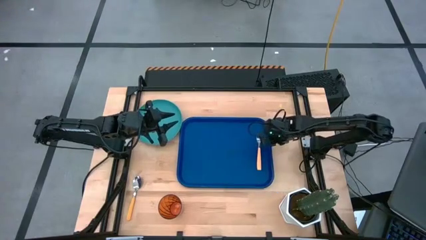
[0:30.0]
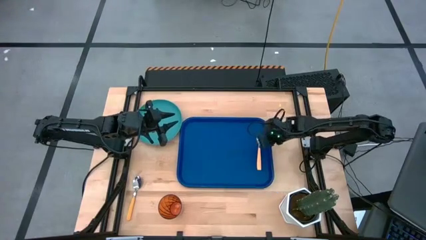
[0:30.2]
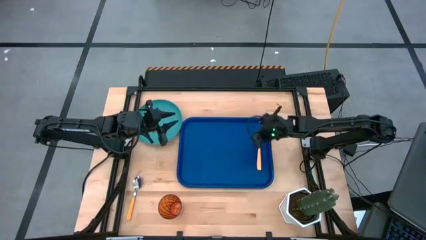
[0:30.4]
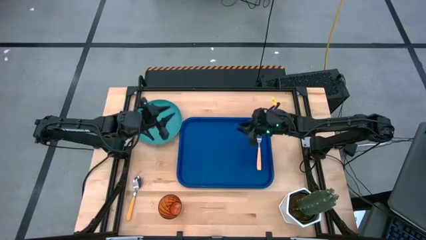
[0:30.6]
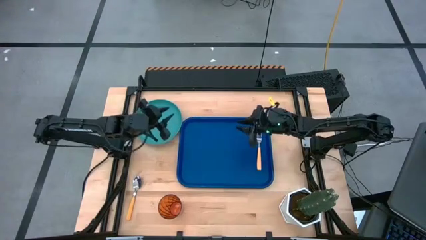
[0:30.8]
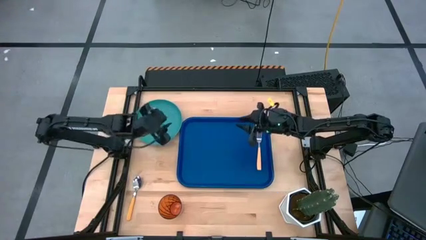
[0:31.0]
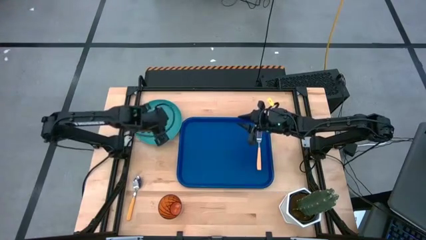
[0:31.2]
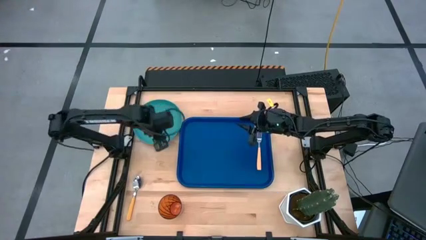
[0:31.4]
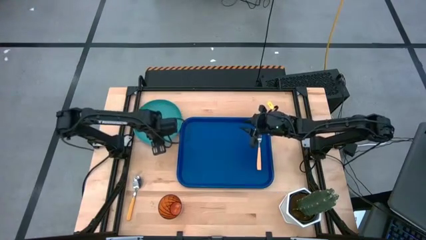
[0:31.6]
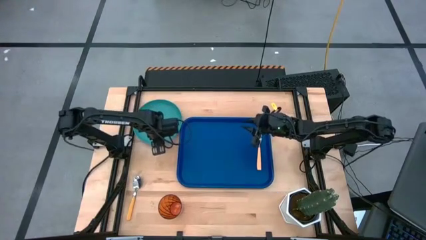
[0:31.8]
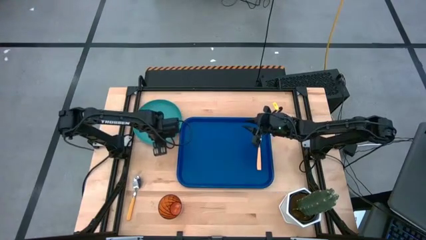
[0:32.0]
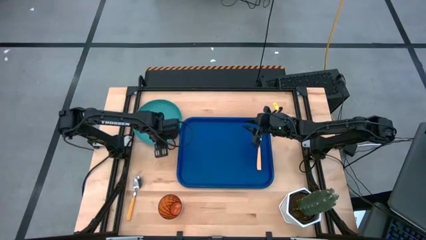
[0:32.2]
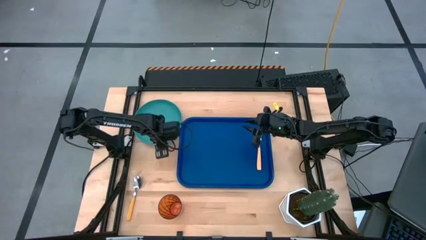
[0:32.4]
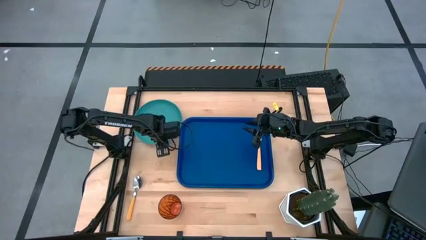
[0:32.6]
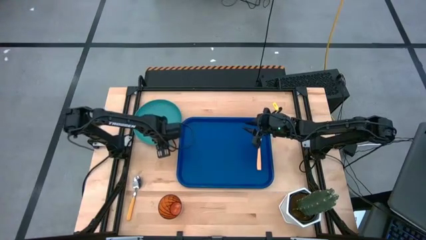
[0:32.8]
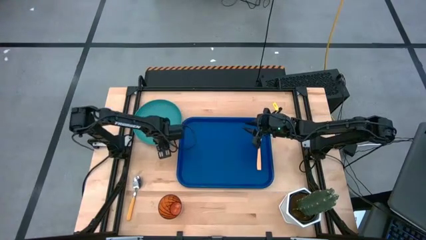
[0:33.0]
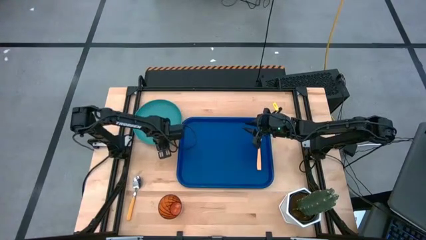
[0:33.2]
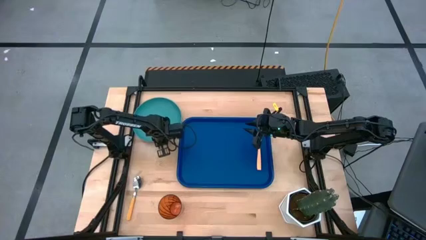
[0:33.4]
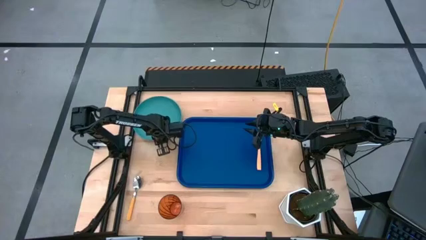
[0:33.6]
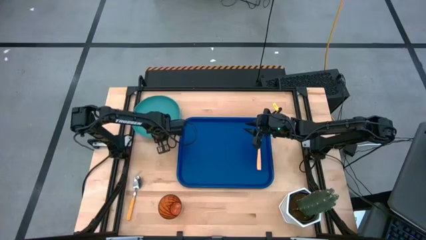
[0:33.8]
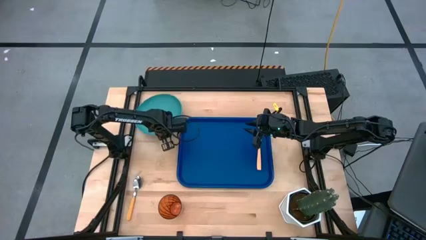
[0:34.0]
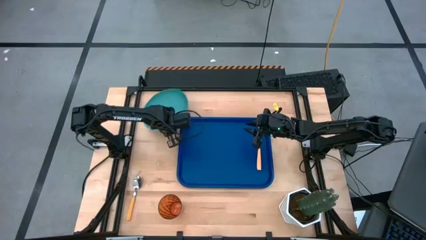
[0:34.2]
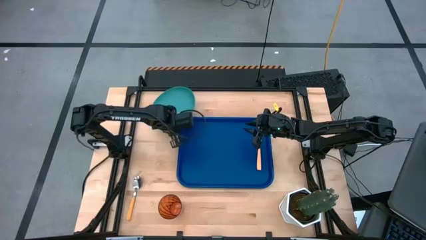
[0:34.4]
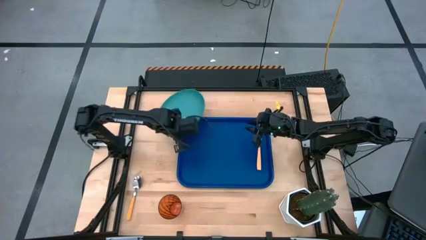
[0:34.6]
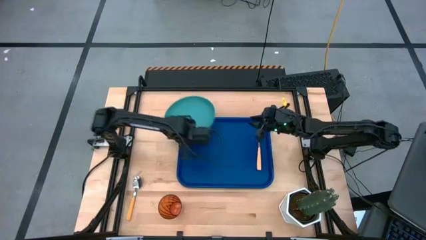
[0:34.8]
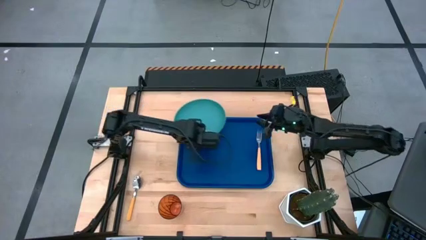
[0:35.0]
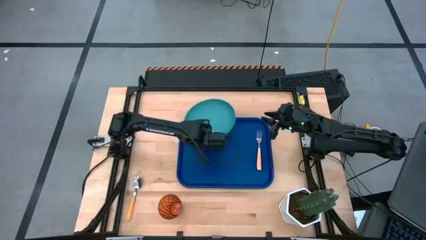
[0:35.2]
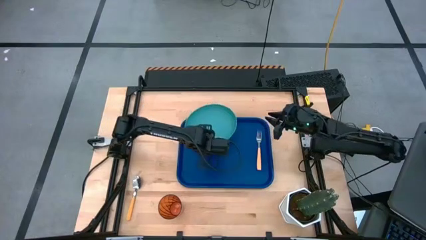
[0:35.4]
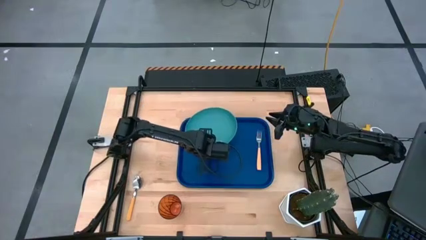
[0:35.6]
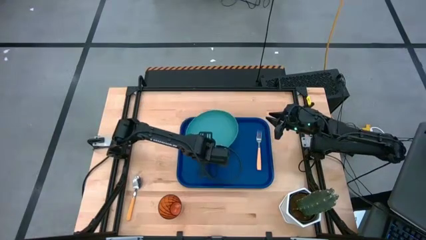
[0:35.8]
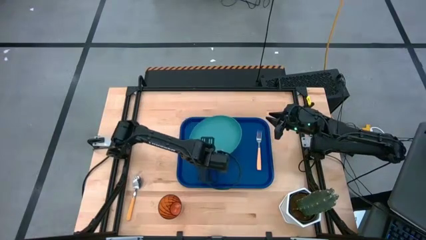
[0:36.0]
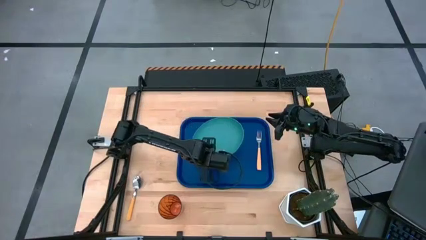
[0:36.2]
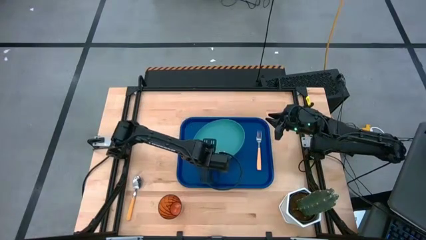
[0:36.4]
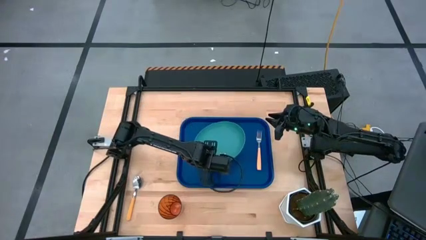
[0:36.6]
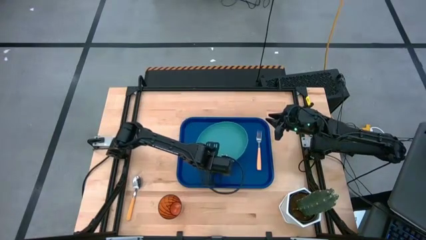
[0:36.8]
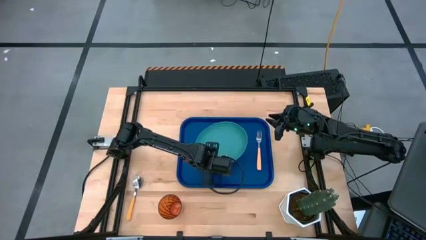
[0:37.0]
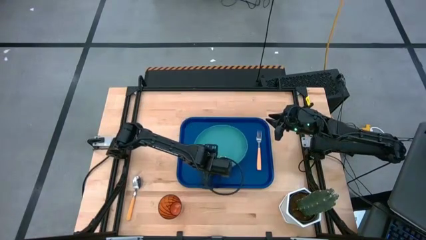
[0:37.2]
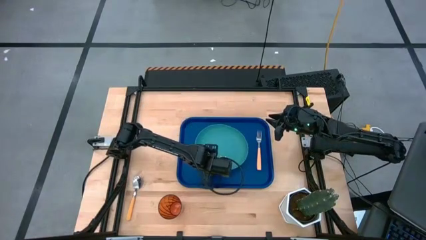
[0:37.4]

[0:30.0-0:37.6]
Task: Pick and place plate/cup/fork/spoon on tray
Put the green plate on the blue tray to the left of the yellow fork

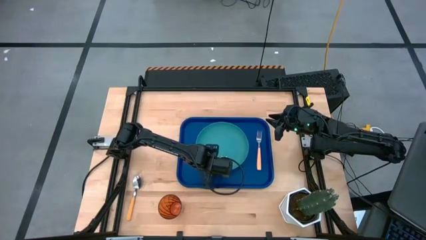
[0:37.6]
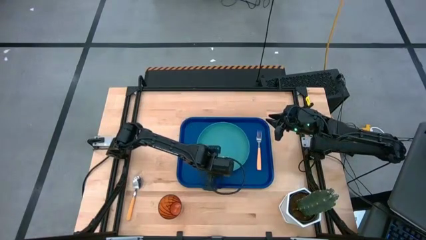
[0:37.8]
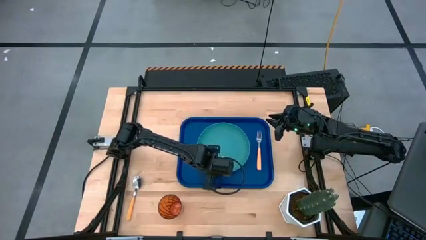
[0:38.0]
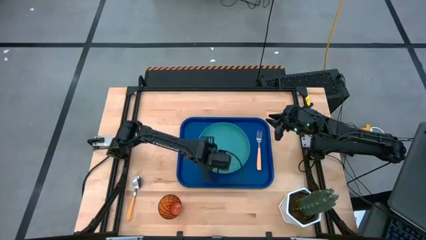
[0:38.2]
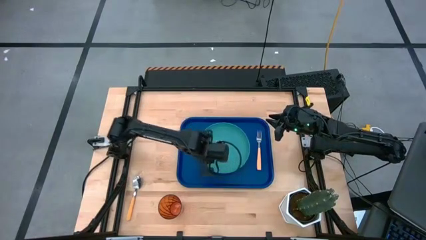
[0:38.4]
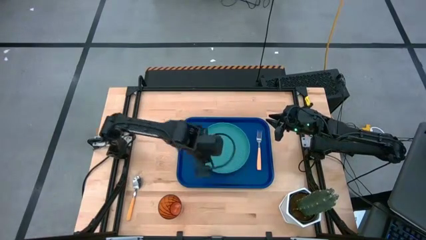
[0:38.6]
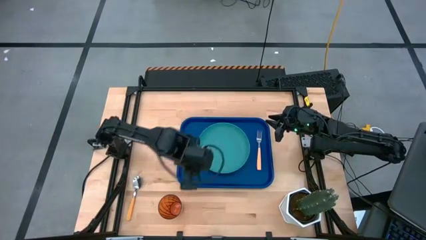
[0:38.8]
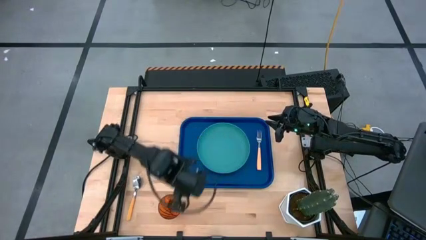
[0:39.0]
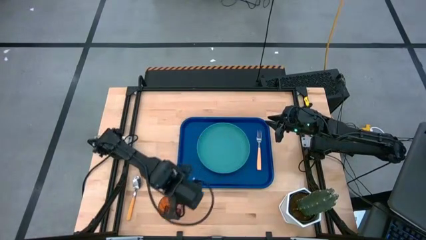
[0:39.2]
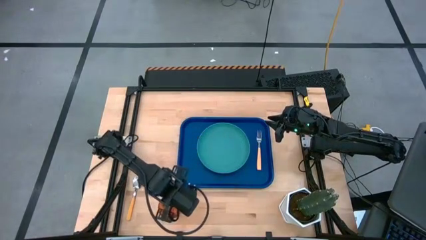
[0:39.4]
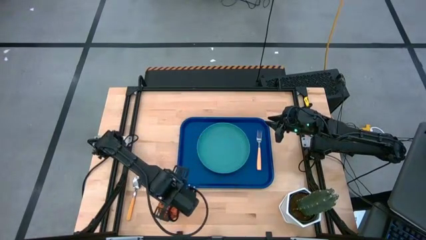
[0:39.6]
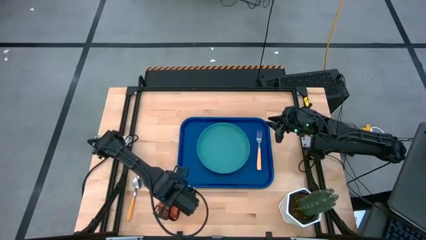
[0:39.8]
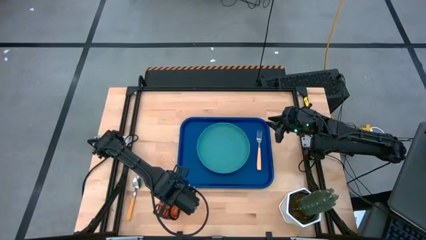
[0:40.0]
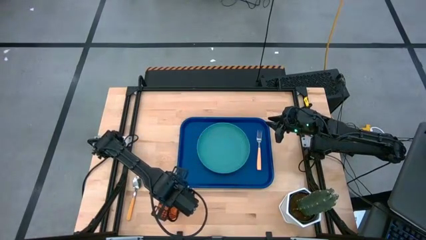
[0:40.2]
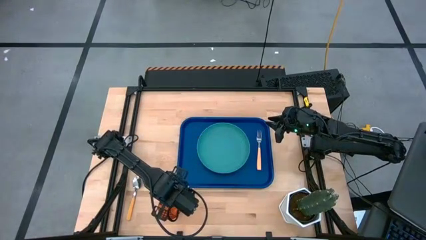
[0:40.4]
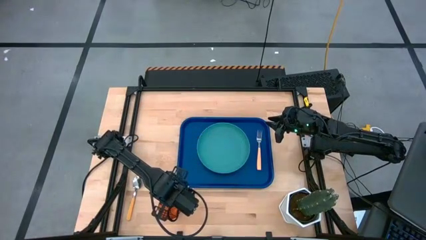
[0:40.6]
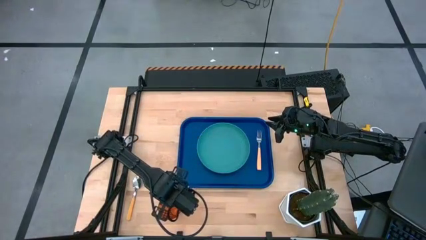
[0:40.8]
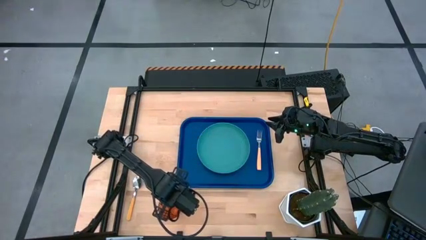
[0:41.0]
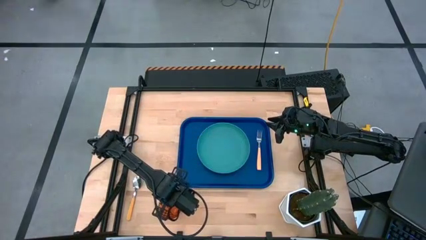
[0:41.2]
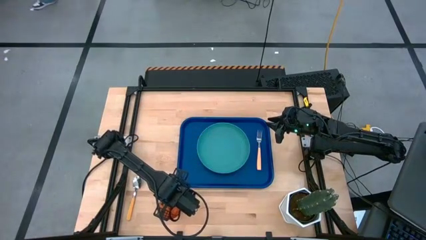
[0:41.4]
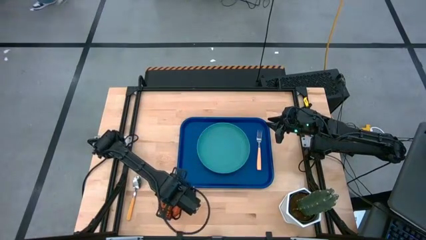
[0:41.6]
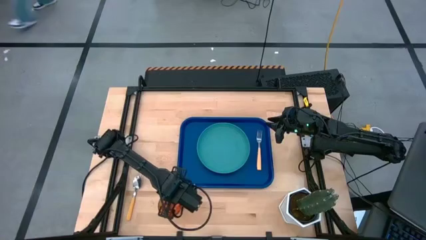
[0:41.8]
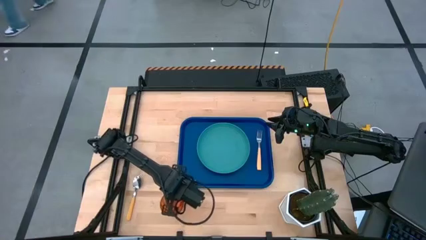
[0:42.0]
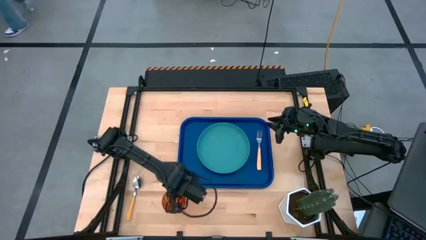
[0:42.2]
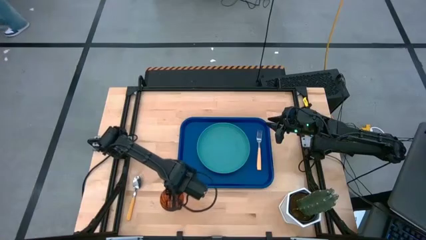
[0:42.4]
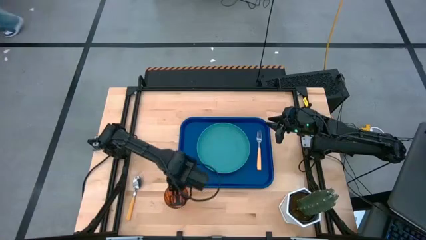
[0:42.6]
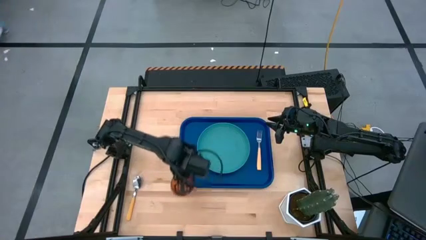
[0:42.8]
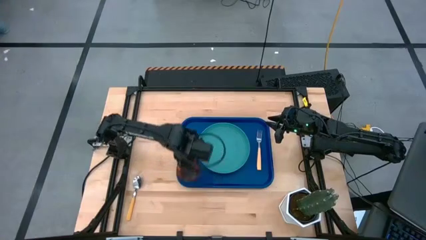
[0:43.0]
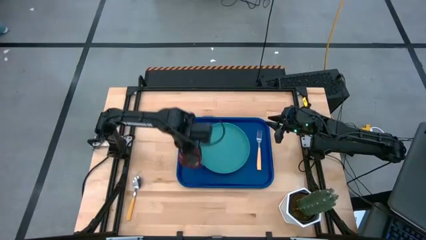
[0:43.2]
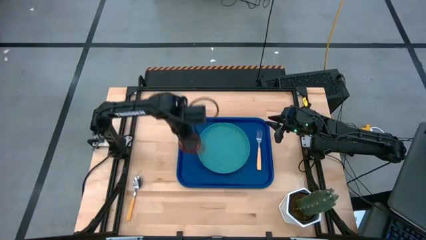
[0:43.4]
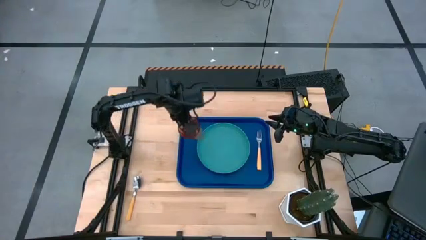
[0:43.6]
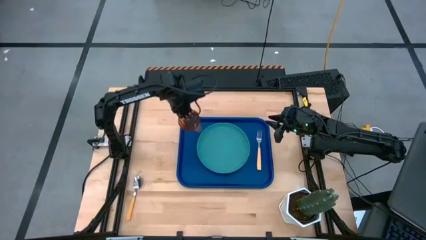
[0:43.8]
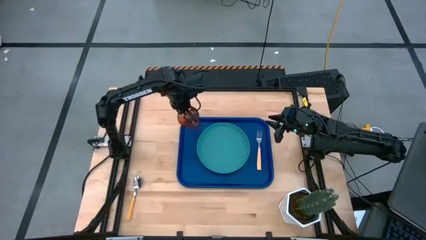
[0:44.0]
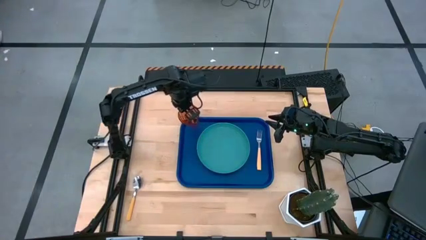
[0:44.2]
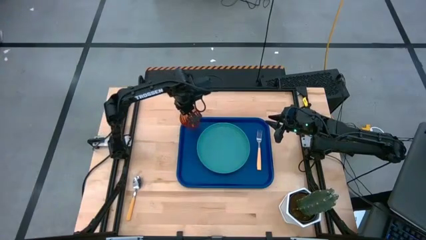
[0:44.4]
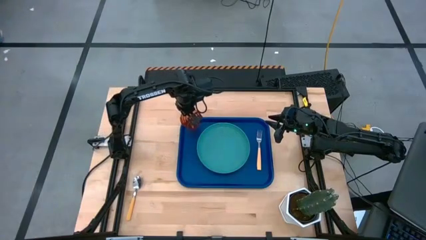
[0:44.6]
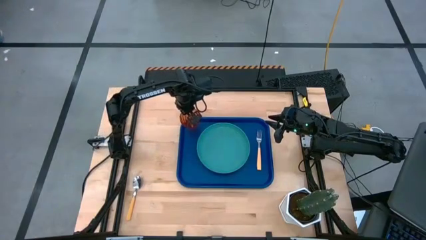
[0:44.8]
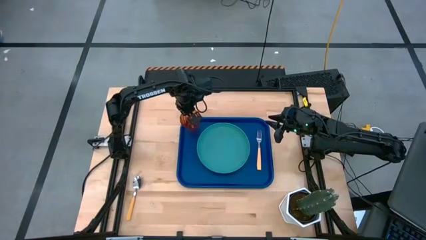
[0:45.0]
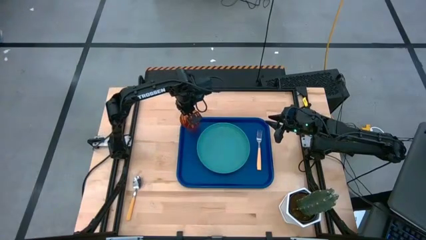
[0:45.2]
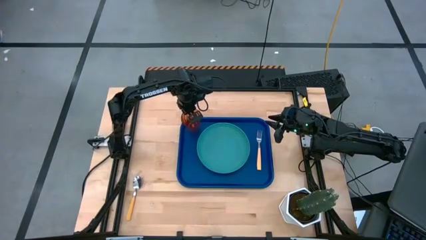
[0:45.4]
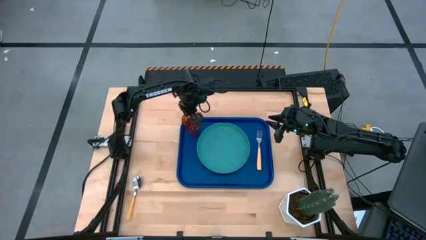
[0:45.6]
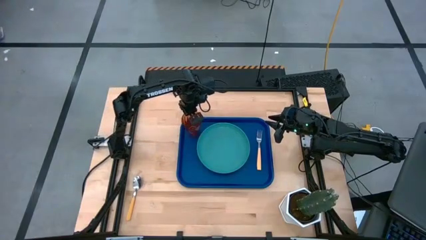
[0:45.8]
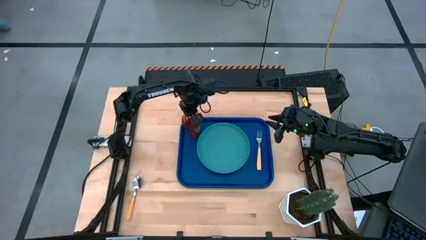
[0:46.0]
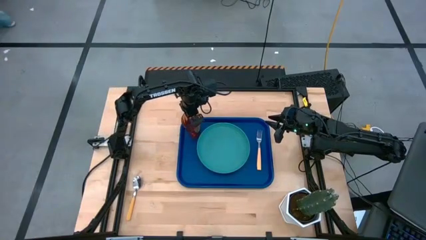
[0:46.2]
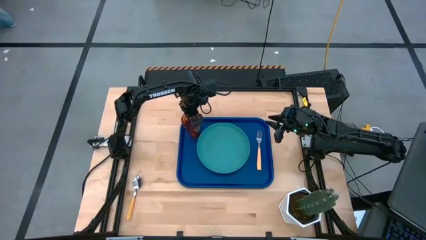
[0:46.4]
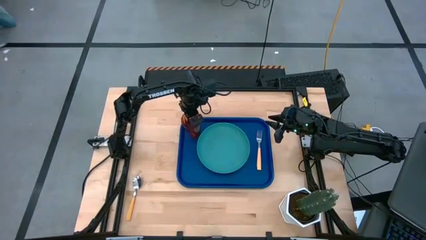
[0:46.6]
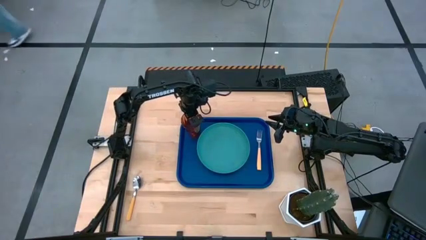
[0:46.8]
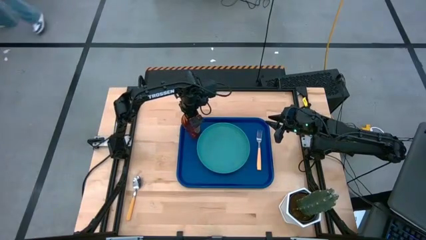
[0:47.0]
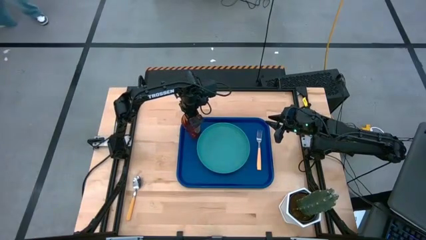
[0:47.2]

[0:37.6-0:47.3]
Put the brown cup on the blue tray to the top left of the green plate
